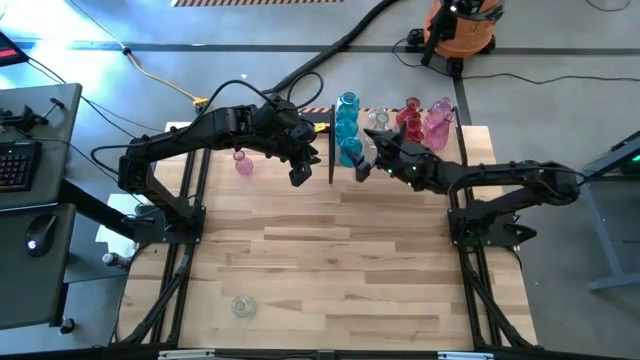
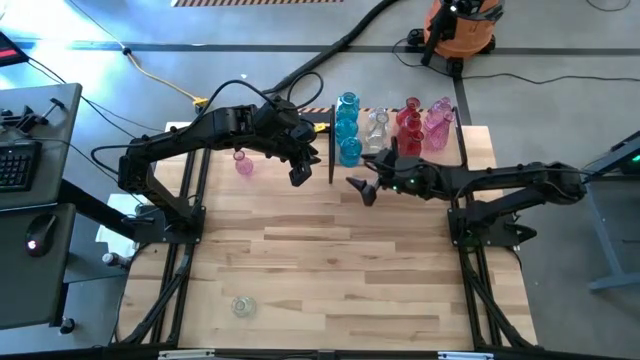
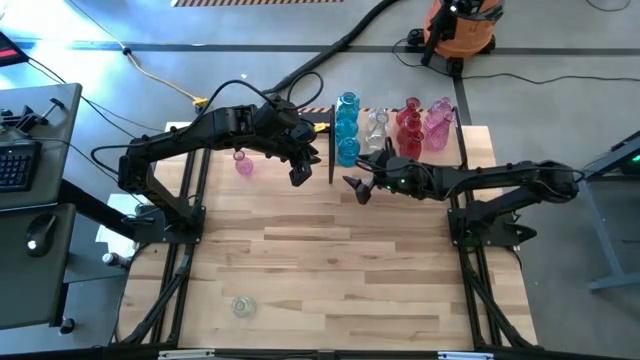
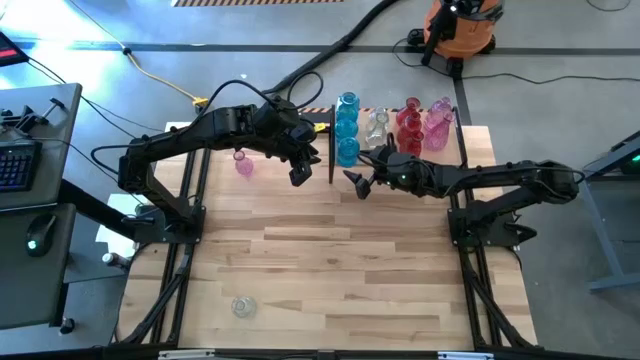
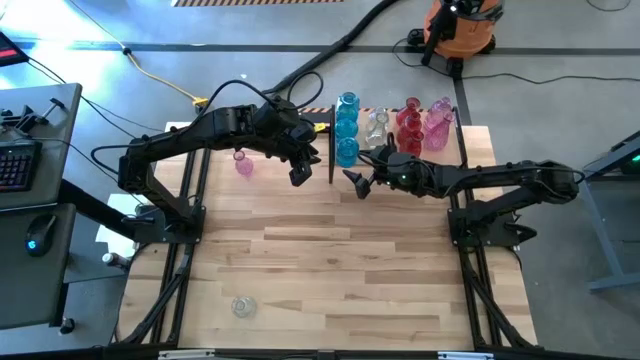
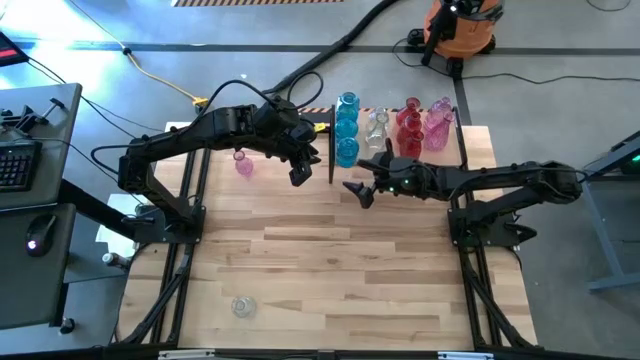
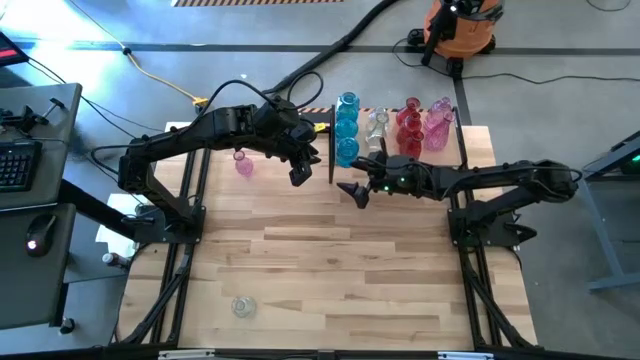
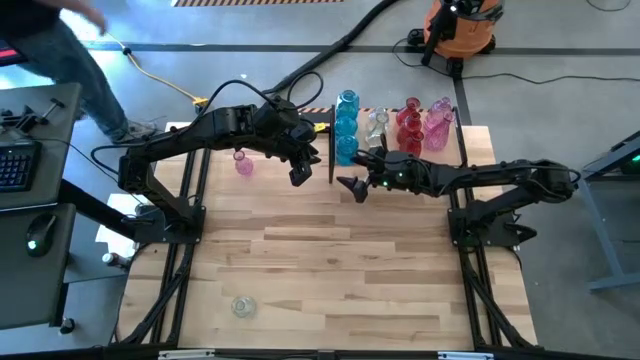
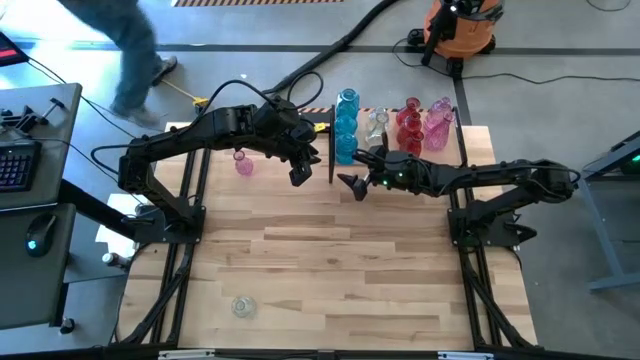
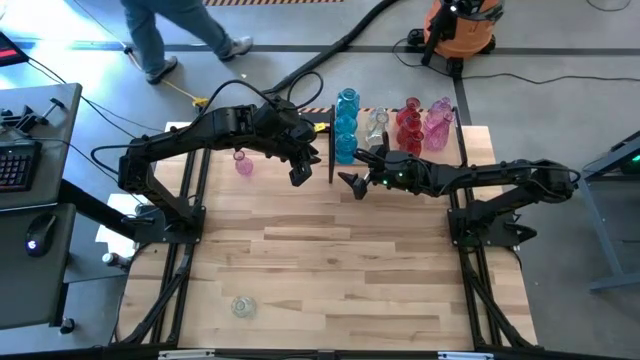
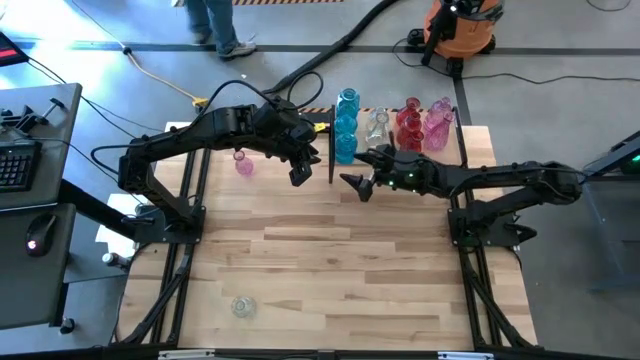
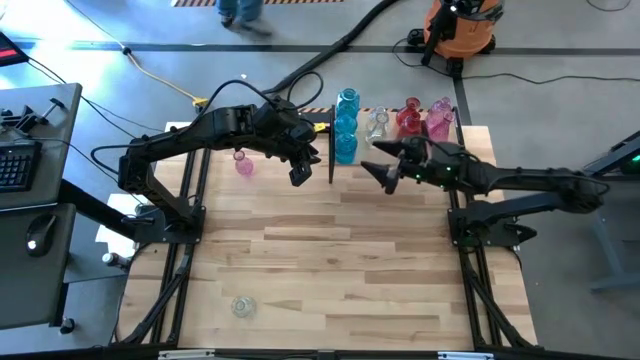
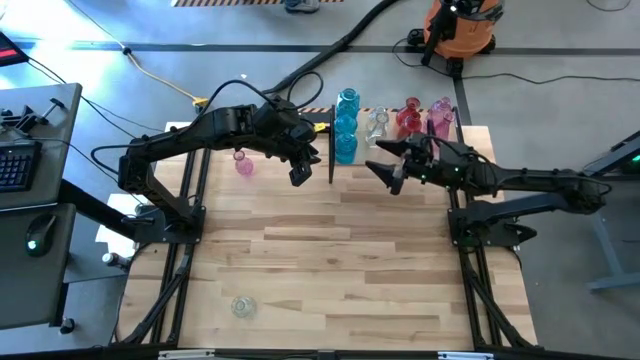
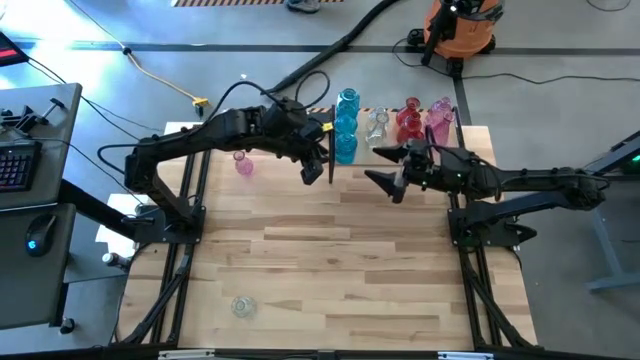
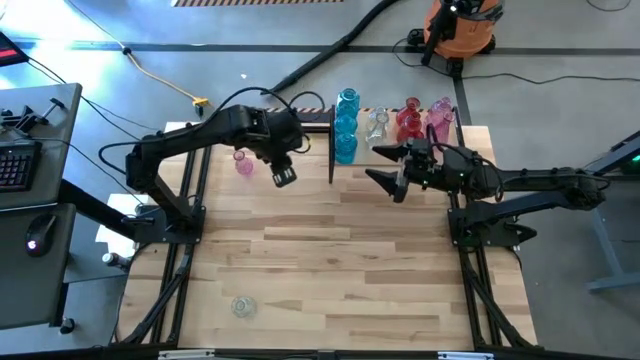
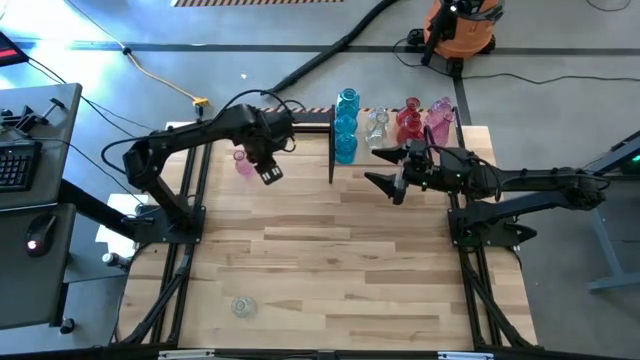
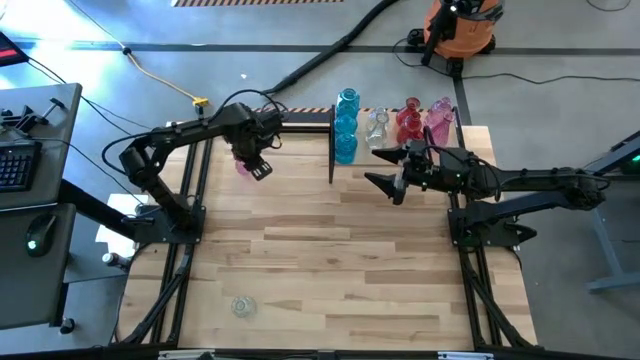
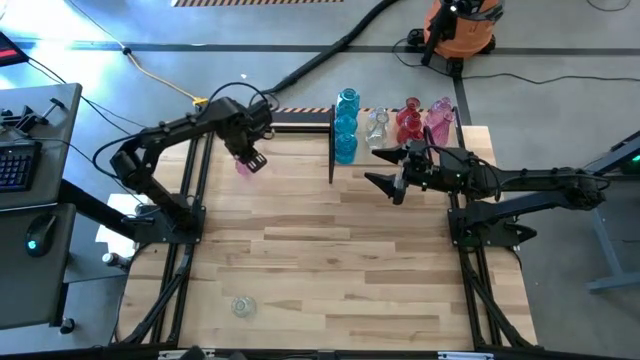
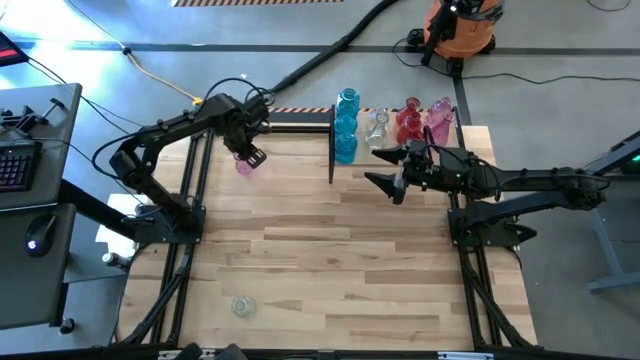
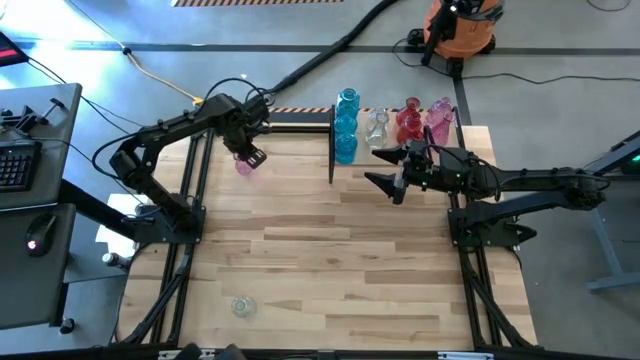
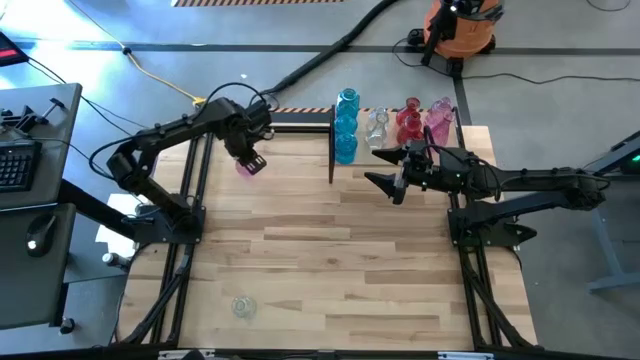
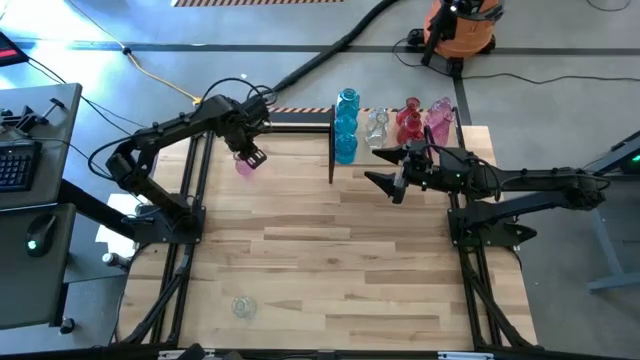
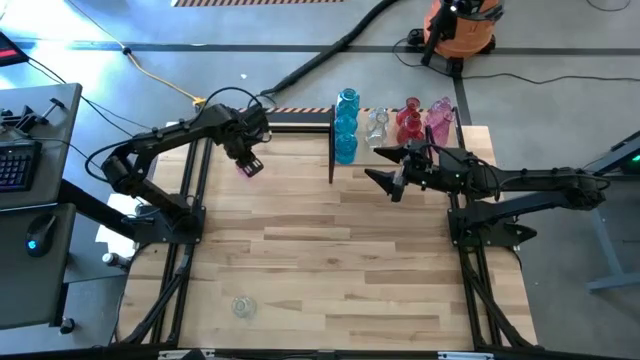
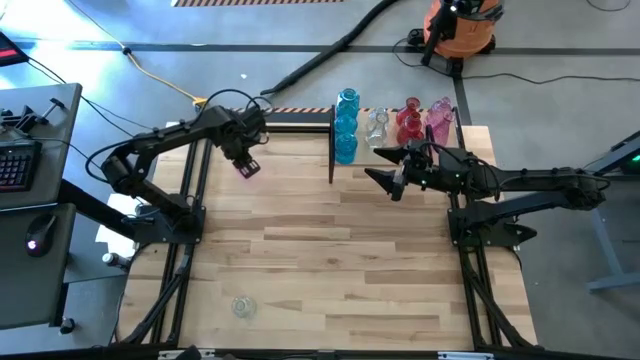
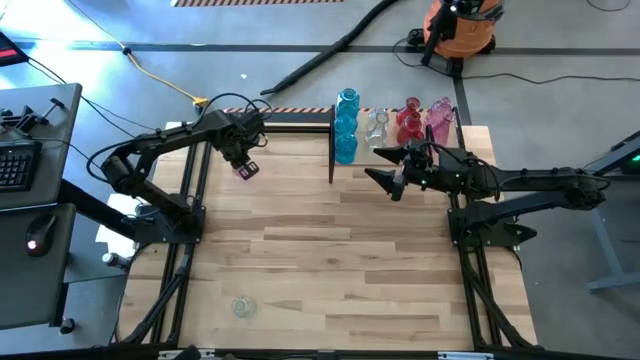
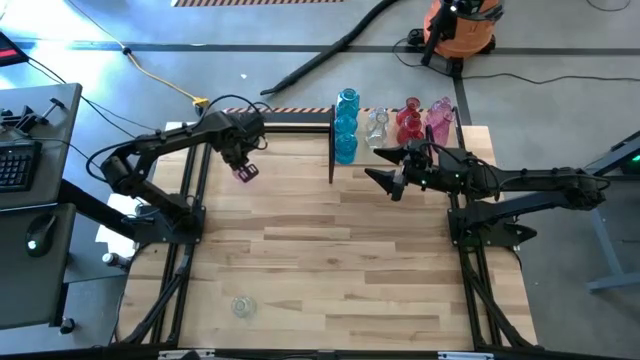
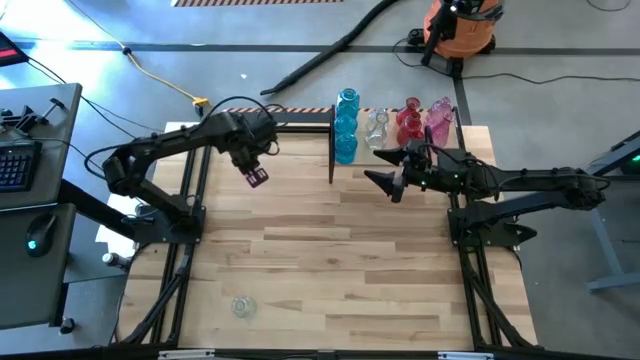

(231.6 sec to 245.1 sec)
Task: sort vases onto shelf
Put the purple vase on the shelf aligned with the other purple vase

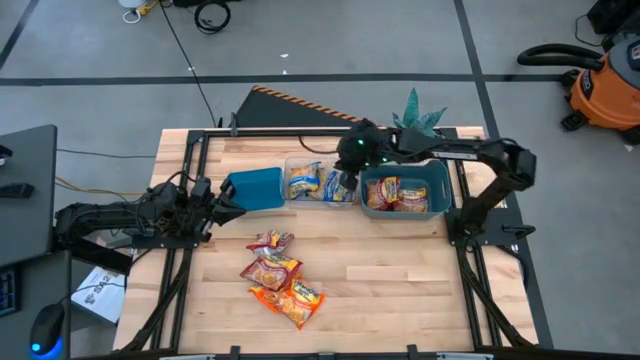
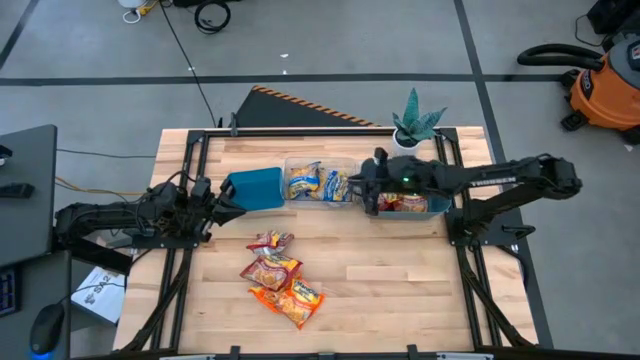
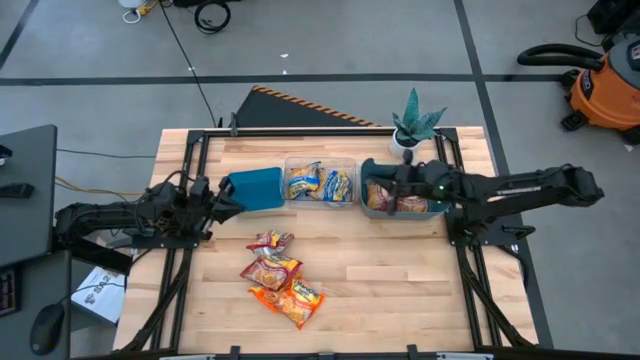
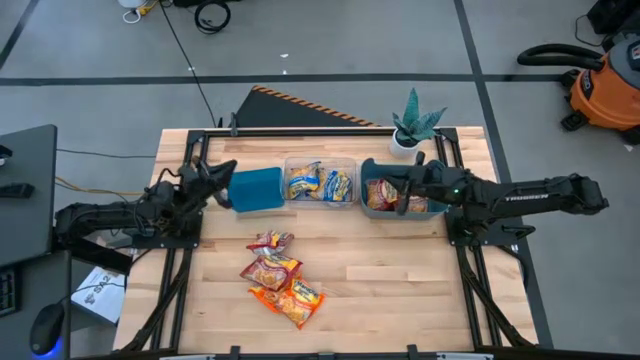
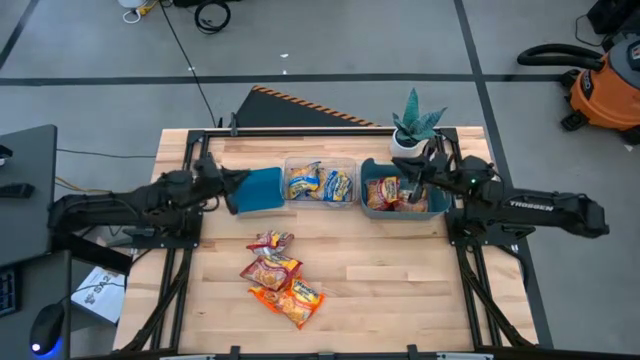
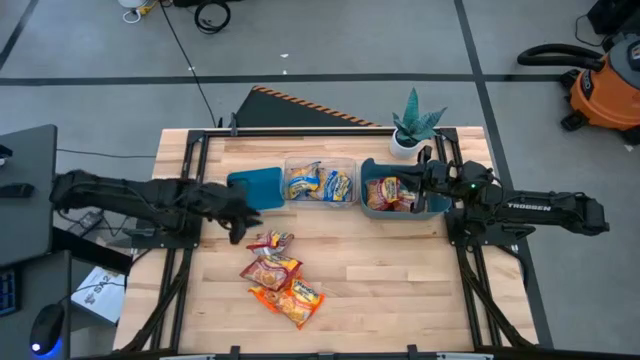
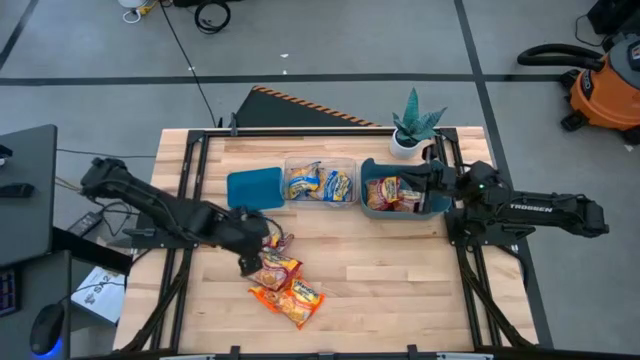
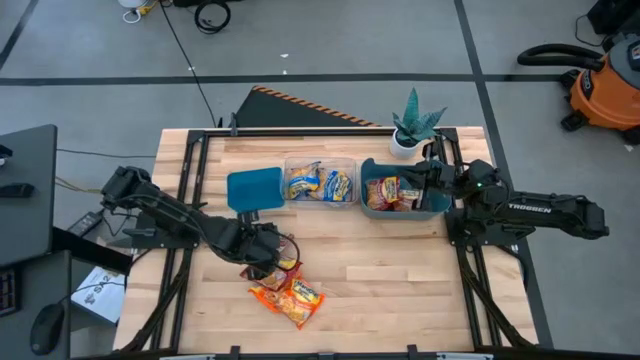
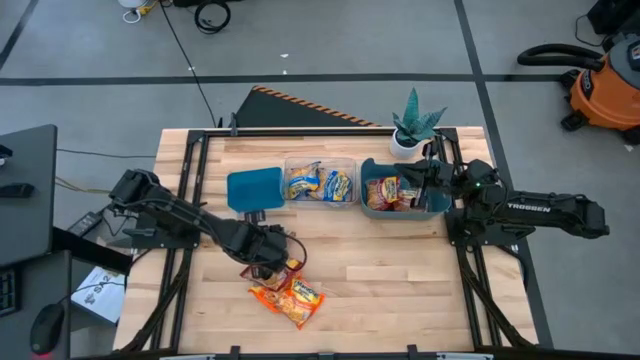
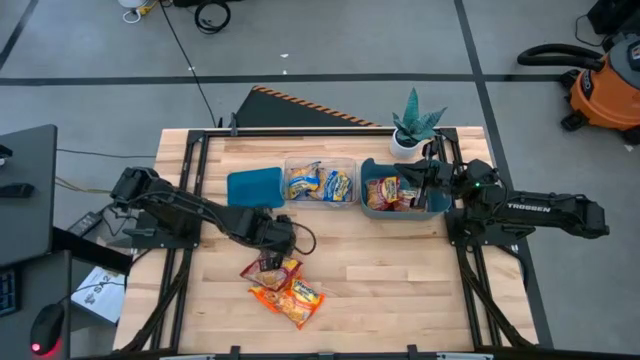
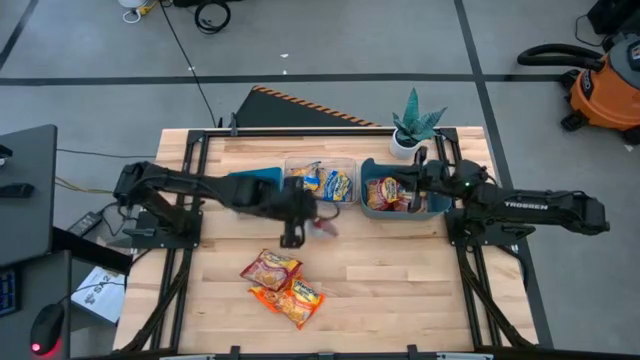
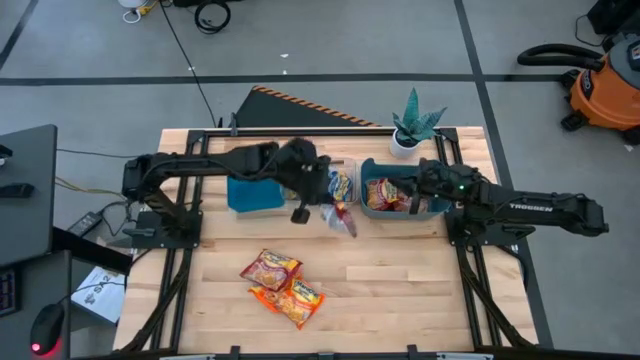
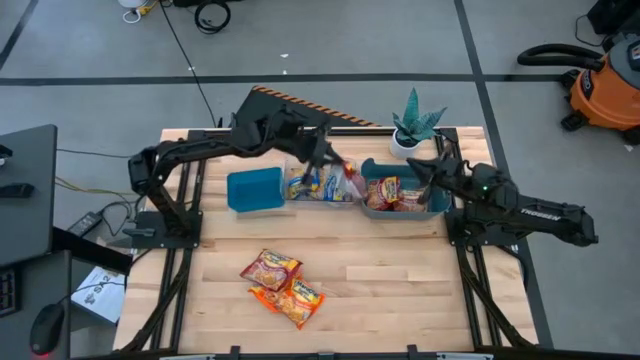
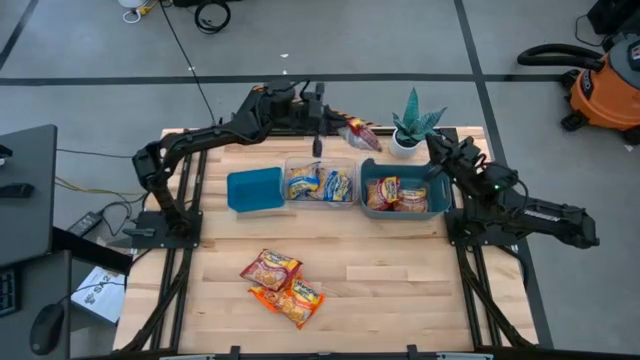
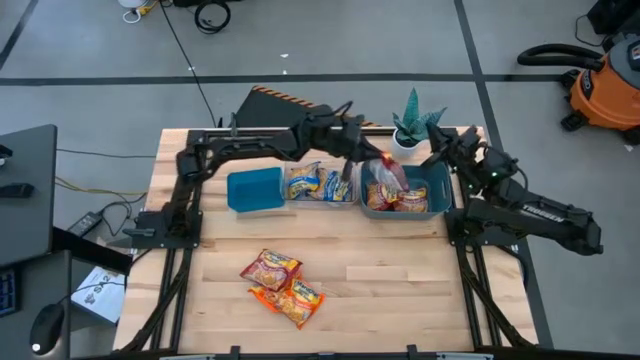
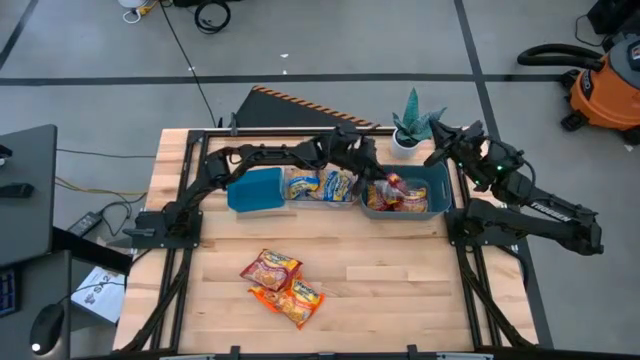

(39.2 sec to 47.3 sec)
Task: Sort Maruchan noodles
Put the top red noddle pack into the dark blue bin
